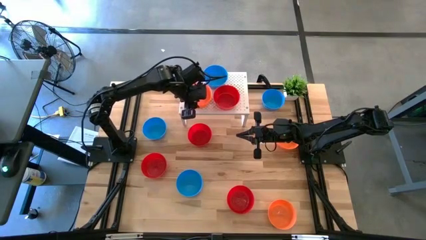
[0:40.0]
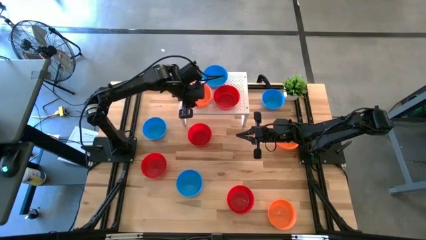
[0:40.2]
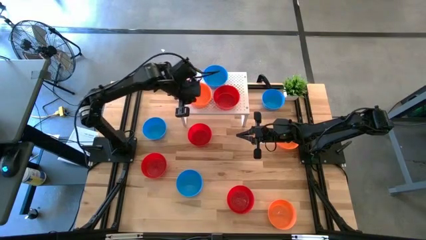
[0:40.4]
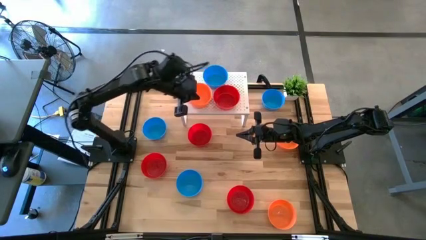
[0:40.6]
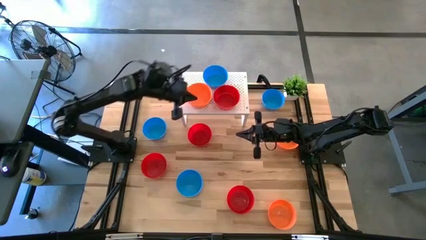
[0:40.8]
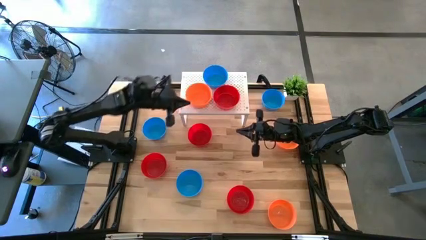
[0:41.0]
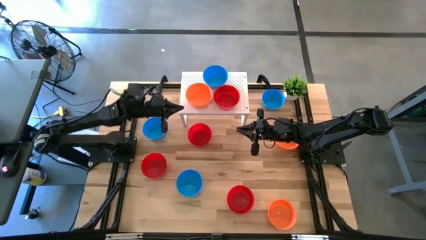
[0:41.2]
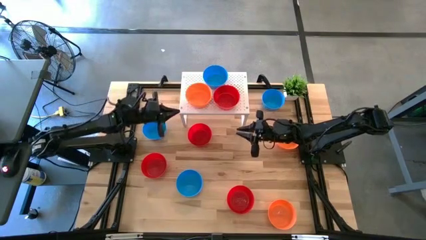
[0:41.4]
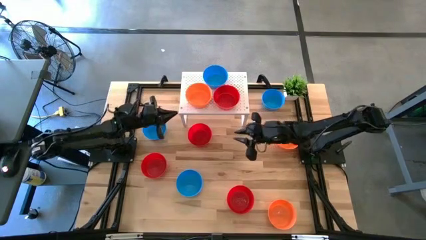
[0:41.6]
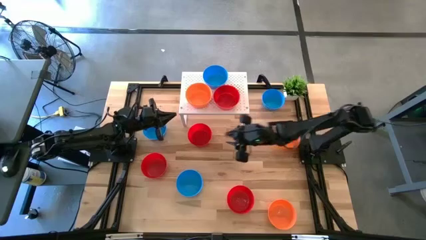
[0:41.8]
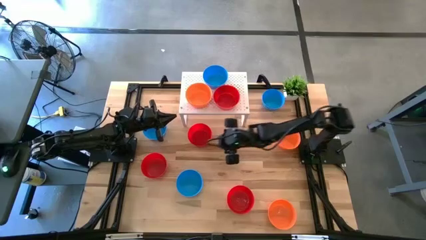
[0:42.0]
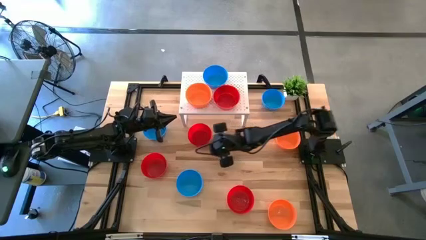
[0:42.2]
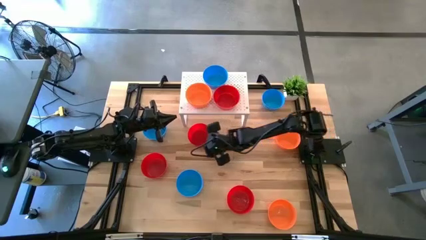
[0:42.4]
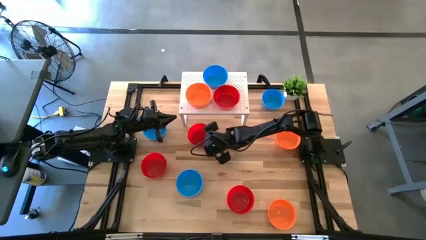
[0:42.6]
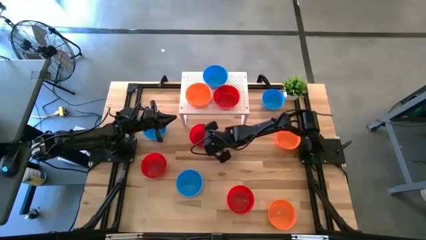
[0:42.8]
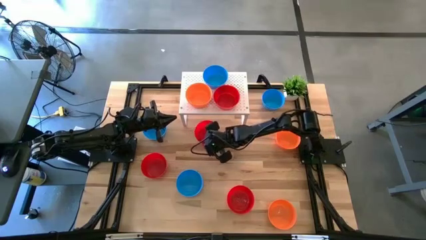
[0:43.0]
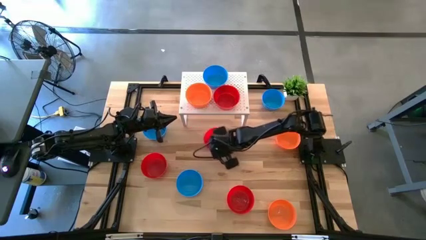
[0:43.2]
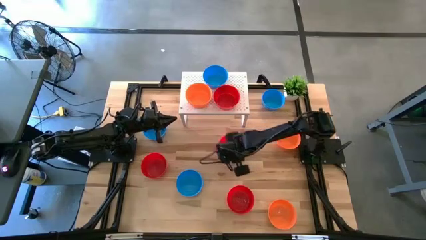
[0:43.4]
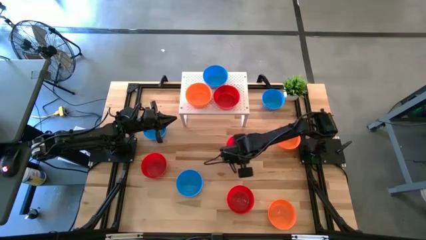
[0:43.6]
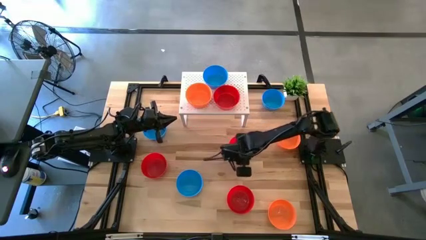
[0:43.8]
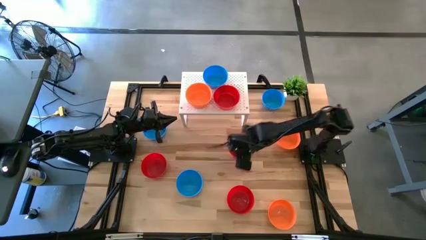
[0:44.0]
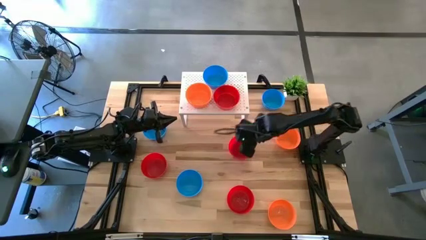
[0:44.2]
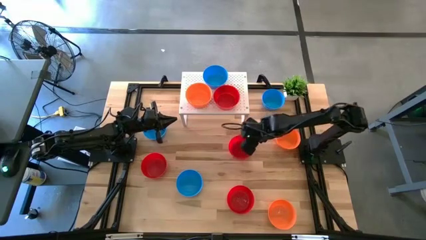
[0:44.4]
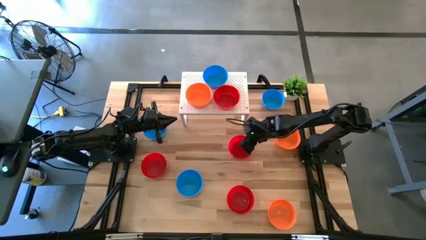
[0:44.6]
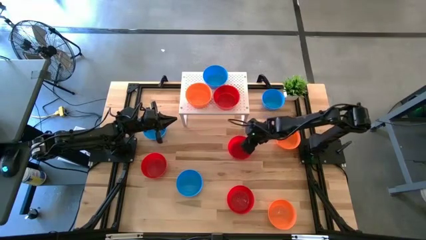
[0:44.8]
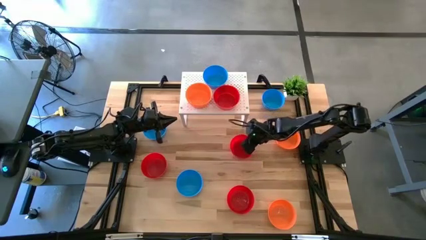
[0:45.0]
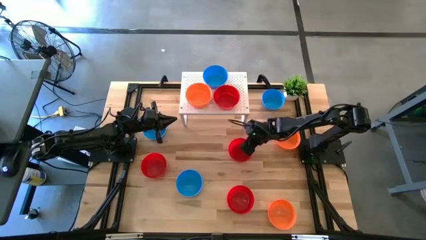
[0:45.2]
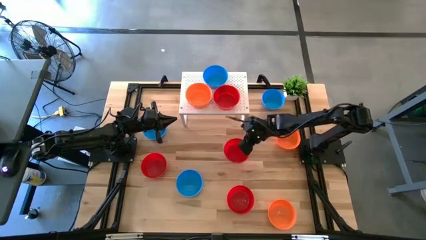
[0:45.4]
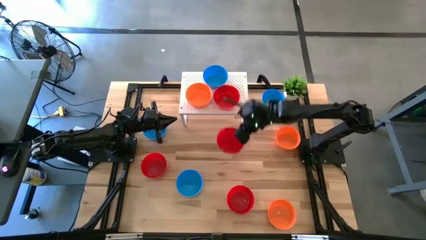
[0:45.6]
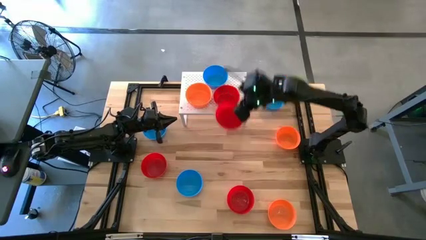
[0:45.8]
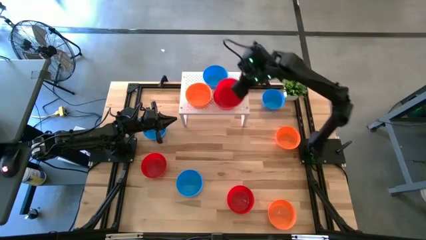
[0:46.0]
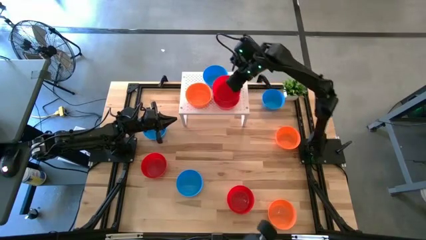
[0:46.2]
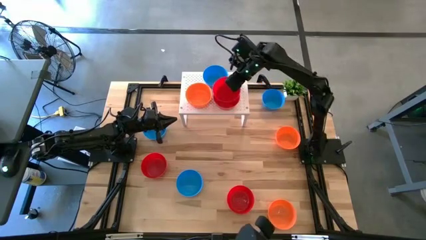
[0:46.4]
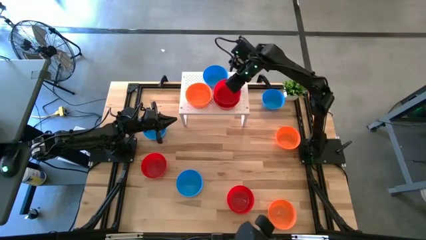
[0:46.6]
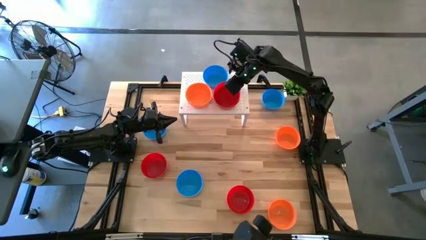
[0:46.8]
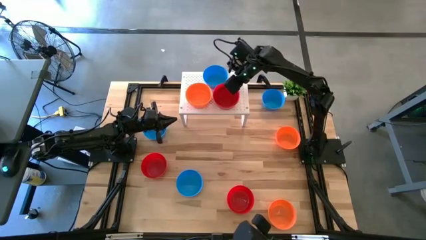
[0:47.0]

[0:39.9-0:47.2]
Task: Pick & Place Mini bowls
Stack the red bowl on the red bowl on the shelf

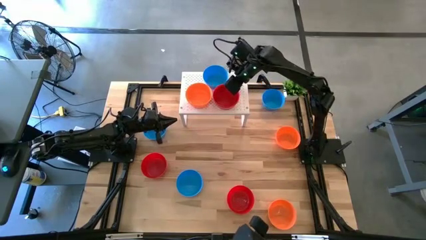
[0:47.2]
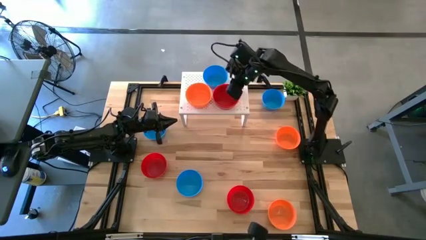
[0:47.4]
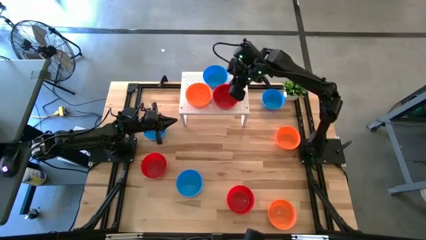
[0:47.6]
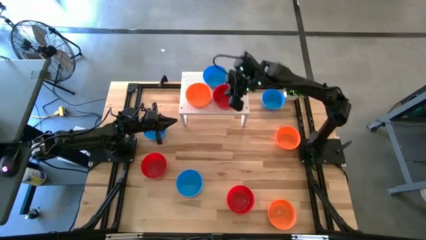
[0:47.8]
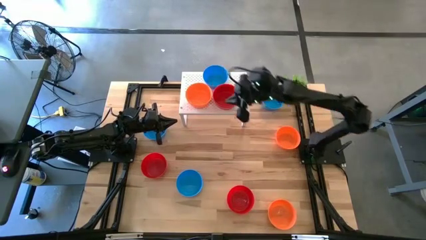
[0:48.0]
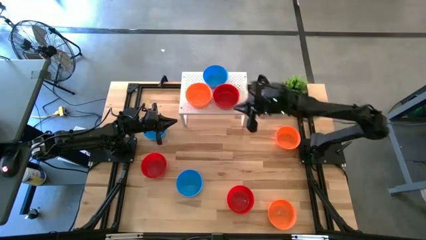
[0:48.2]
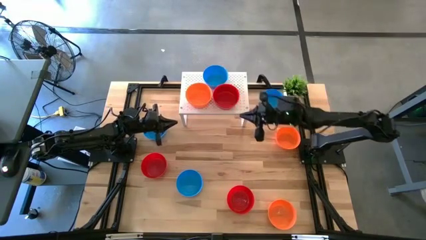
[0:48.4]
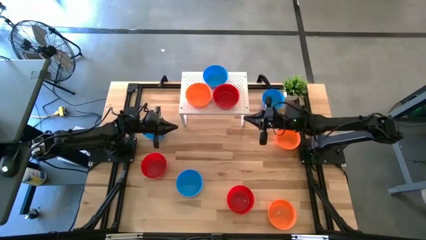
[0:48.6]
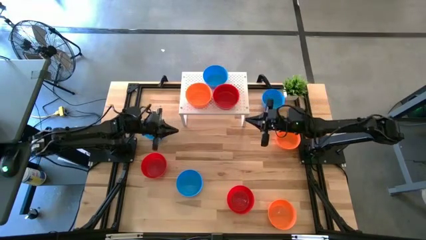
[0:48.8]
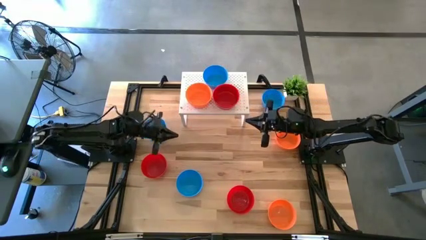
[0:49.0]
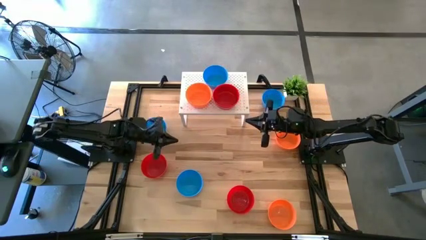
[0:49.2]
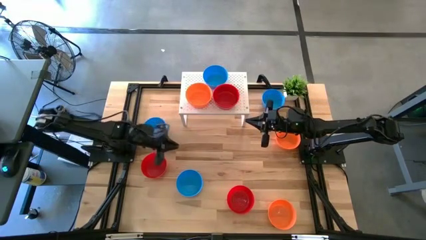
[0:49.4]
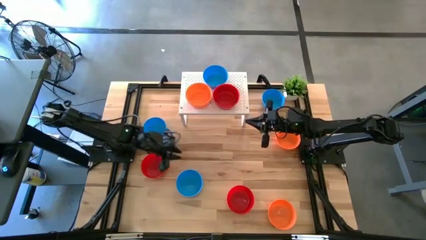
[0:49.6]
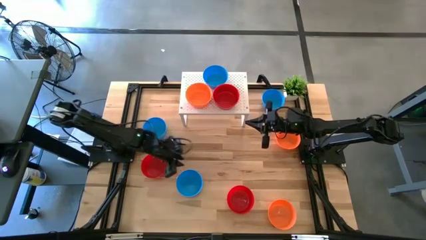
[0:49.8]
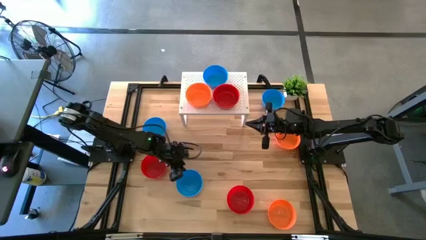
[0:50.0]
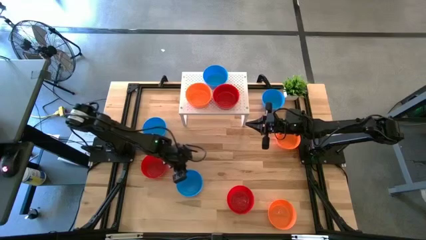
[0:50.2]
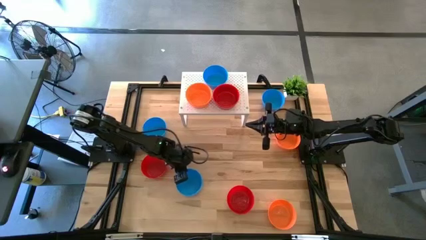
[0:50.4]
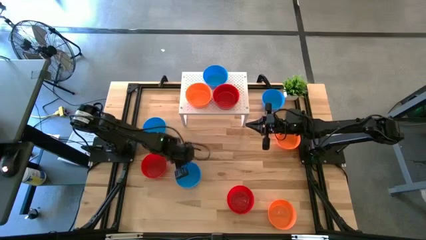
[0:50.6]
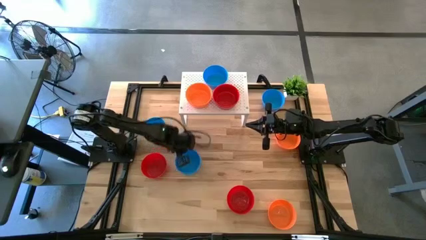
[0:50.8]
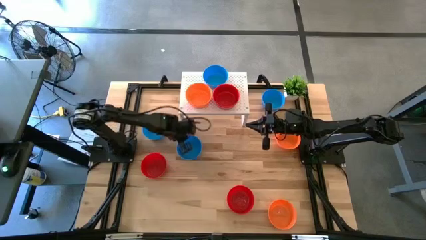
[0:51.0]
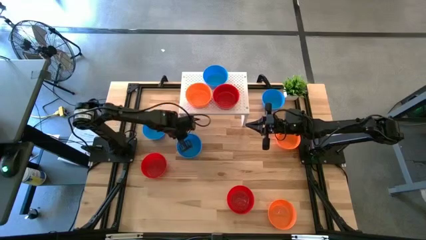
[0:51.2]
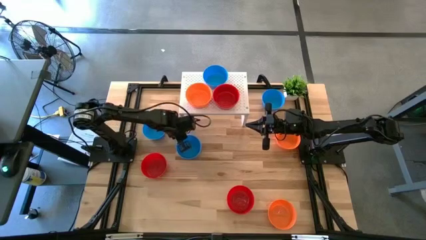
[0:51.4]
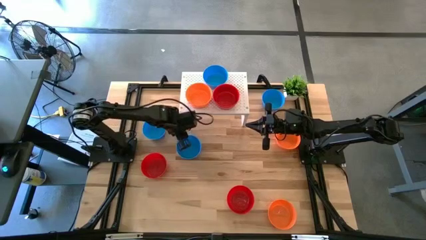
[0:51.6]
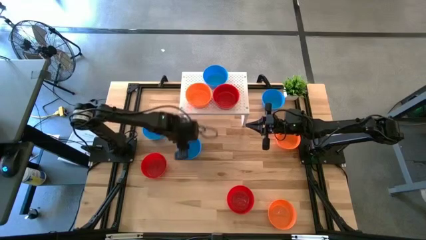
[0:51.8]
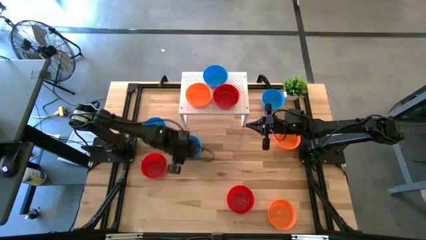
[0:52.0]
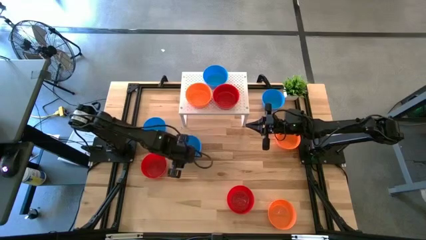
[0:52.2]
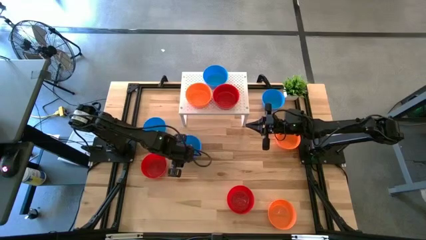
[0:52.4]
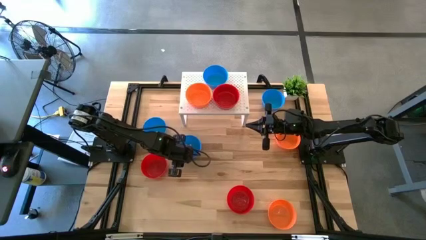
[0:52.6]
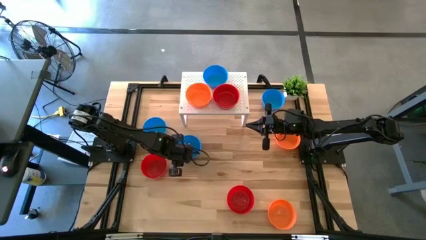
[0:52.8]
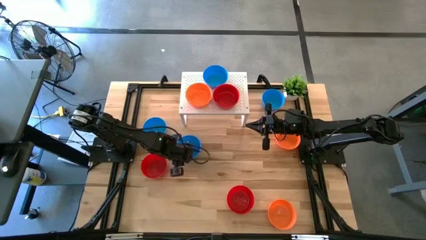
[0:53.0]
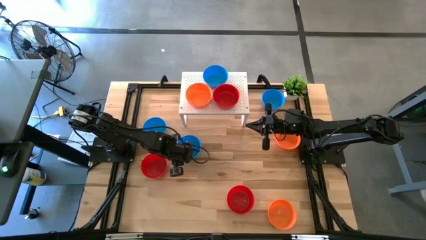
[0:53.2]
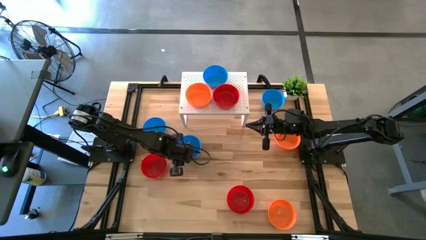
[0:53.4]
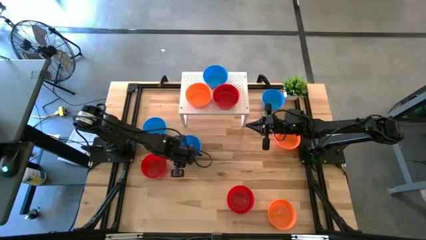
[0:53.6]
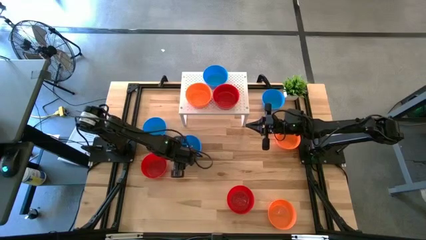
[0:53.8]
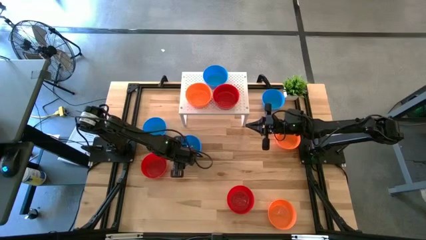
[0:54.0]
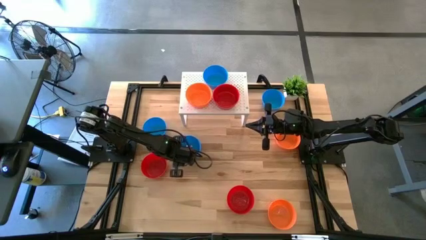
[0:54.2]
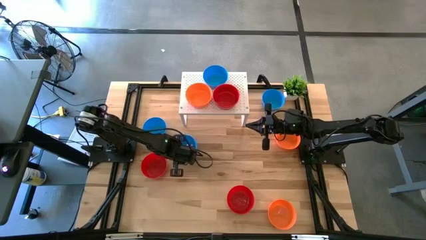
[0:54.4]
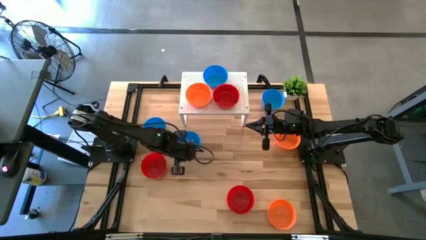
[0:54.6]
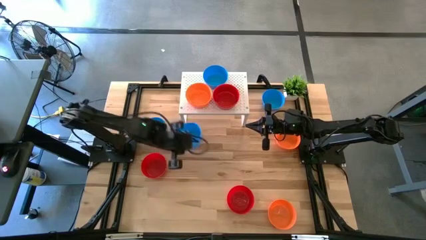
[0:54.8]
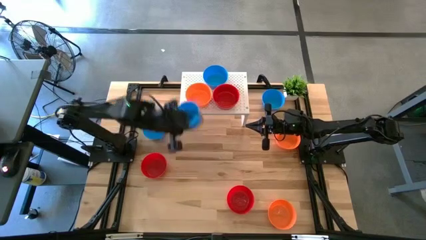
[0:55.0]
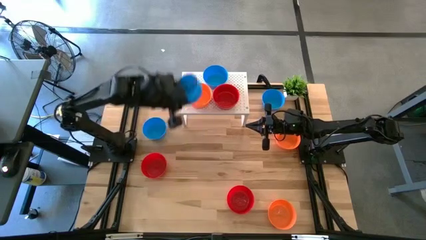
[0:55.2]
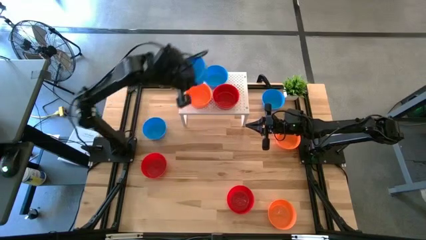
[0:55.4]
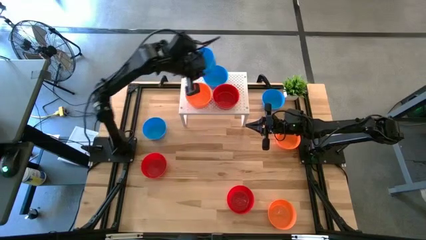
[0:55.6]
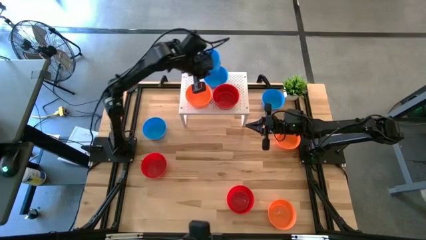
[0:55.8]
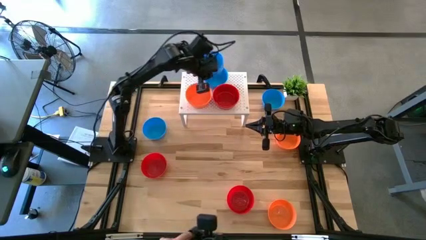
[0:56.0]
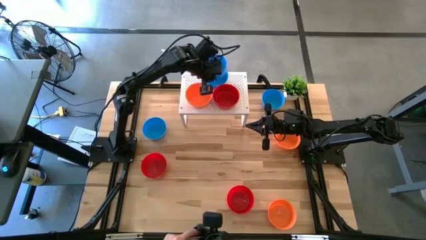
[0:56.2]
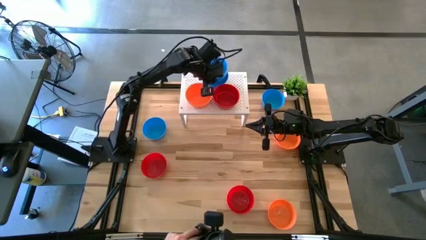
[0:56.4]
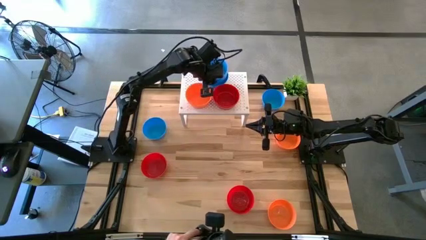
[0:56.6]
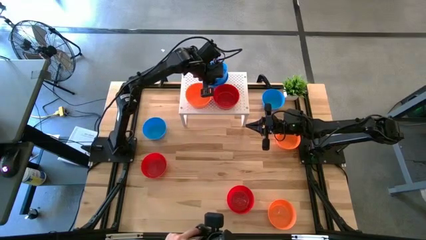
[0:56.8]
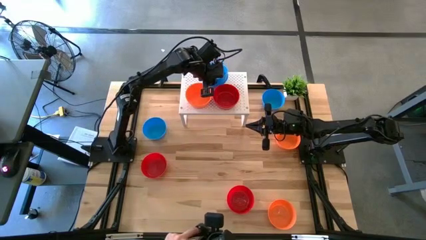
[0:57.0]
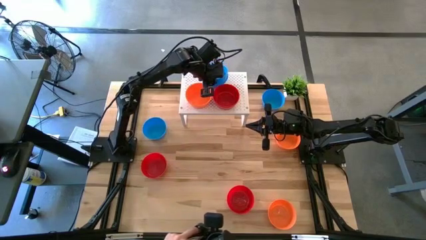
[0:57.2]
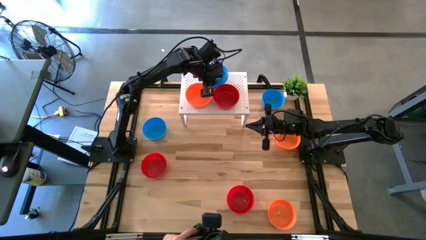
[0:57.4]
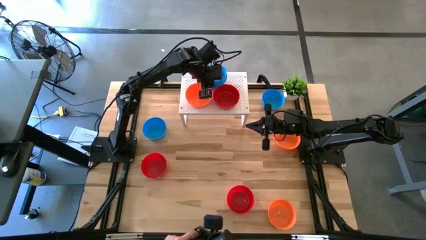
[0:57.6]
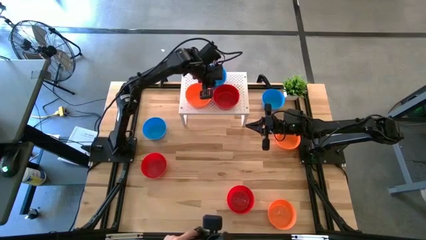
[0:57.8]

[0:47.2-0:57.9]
Stack the blue bowl on the blue bowl on the shelf
